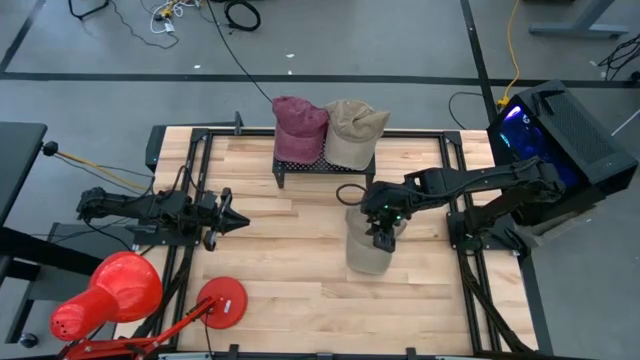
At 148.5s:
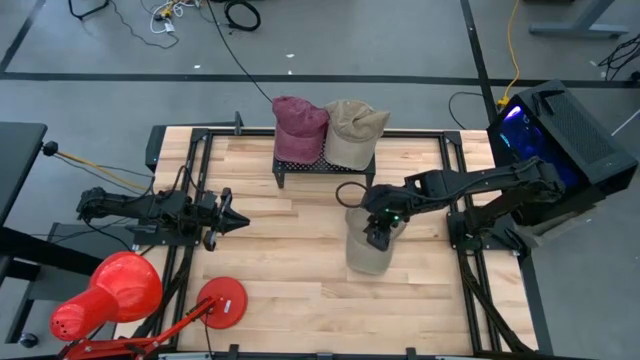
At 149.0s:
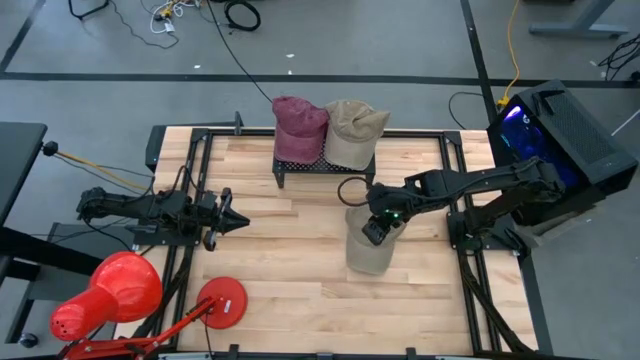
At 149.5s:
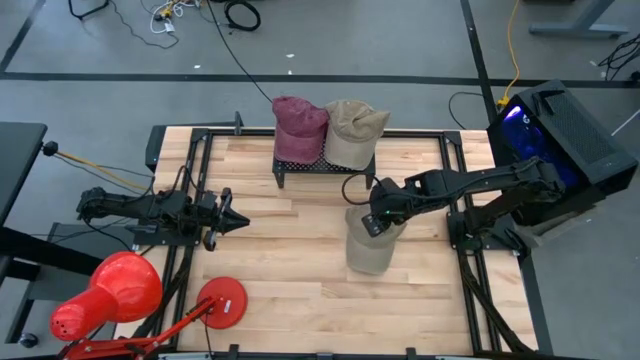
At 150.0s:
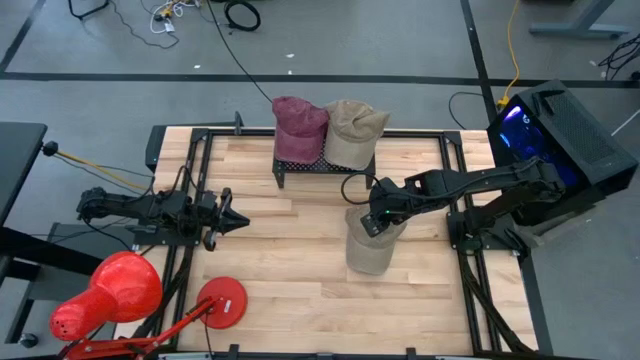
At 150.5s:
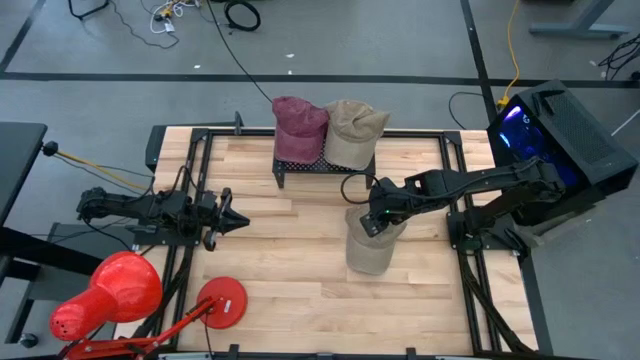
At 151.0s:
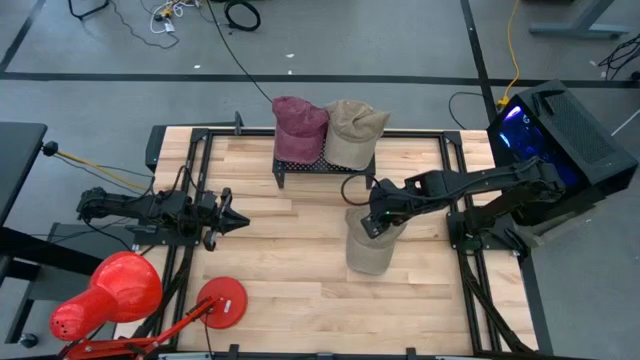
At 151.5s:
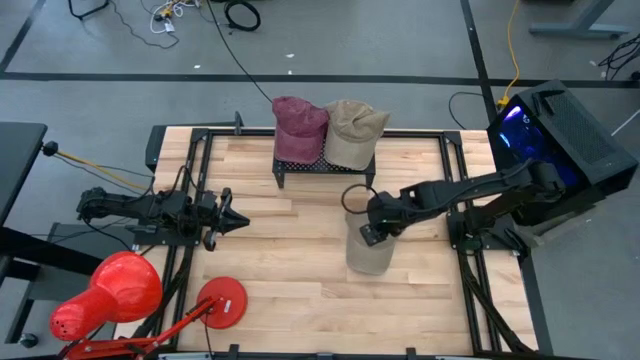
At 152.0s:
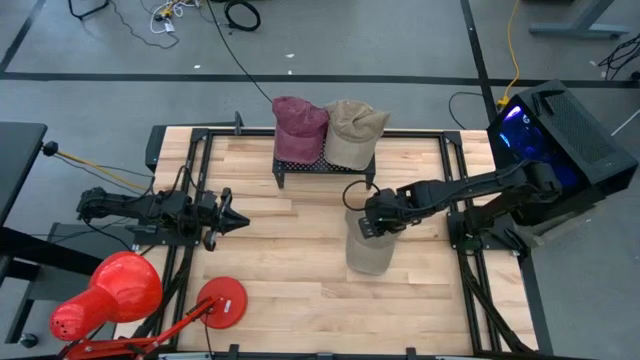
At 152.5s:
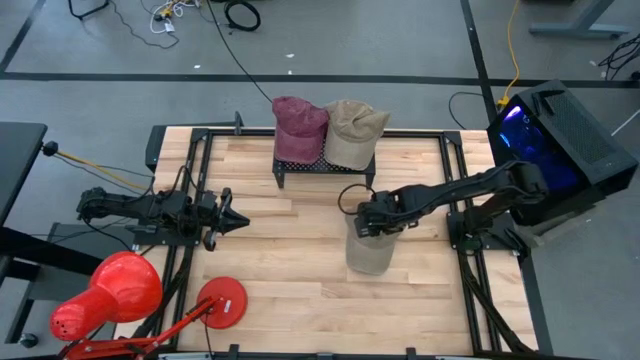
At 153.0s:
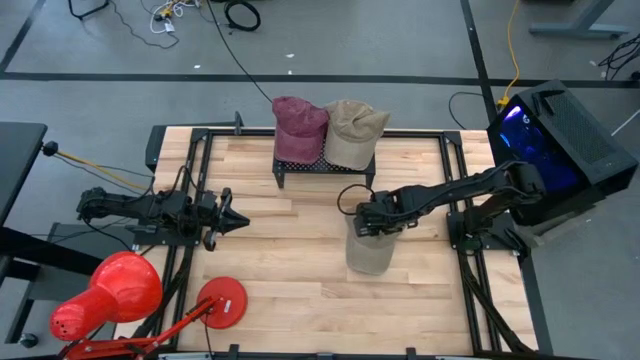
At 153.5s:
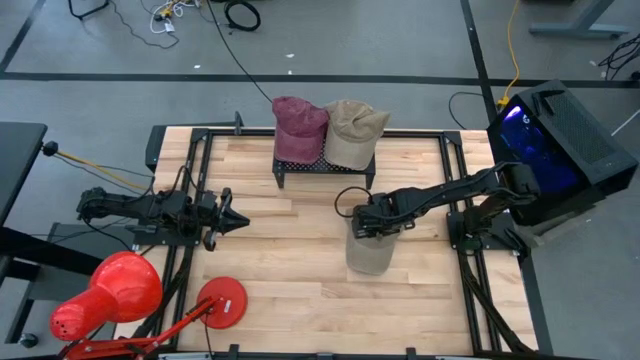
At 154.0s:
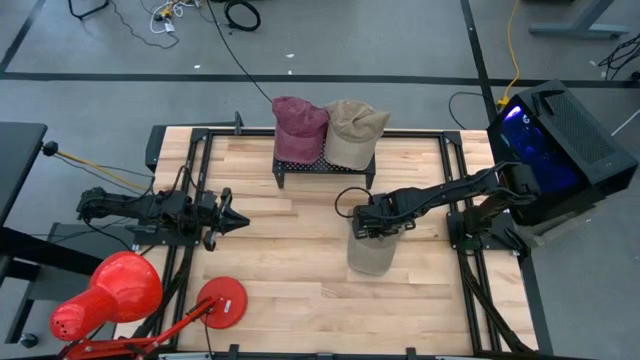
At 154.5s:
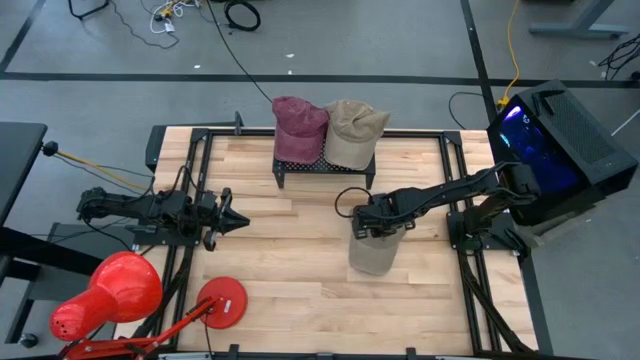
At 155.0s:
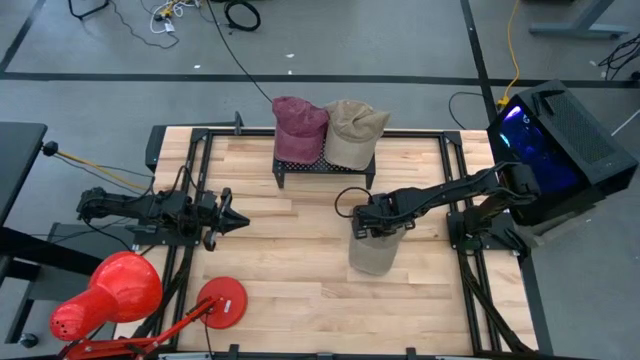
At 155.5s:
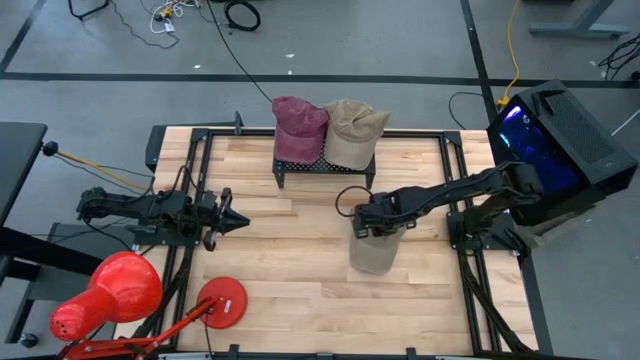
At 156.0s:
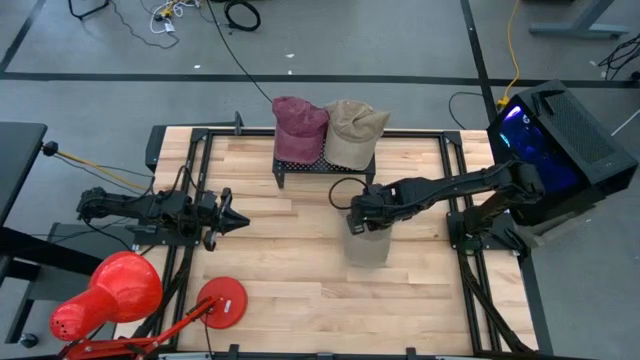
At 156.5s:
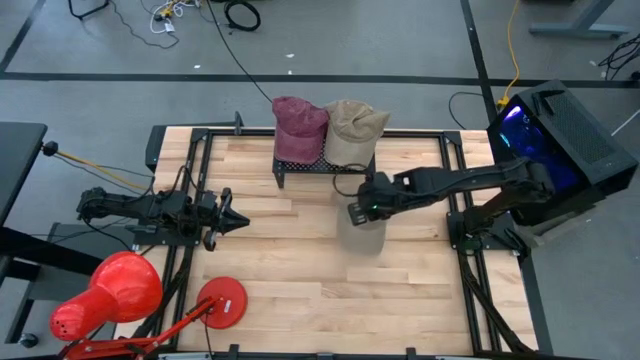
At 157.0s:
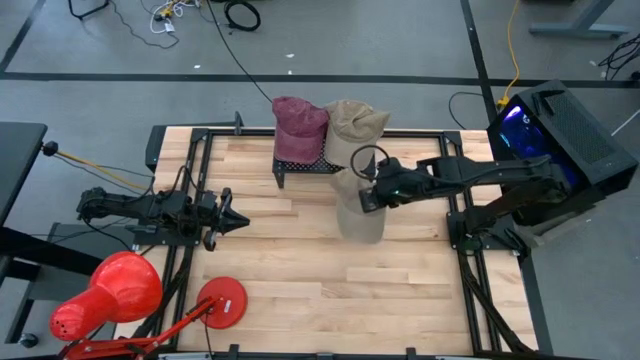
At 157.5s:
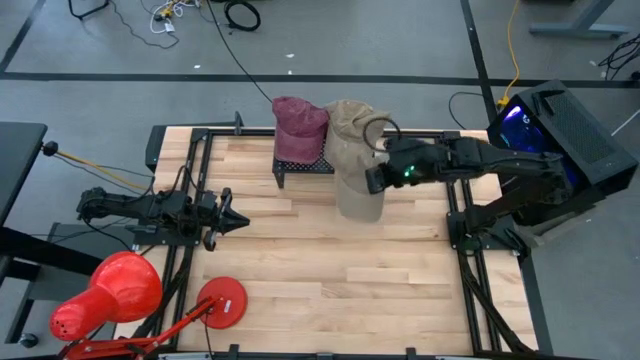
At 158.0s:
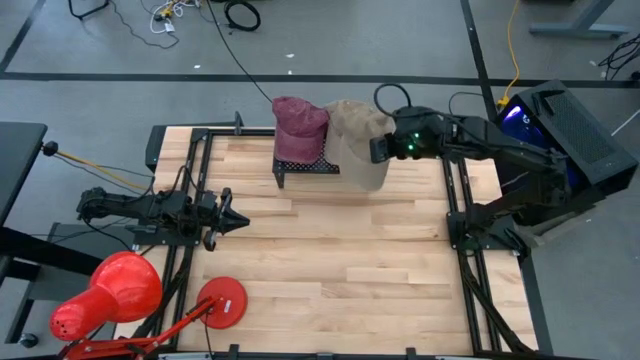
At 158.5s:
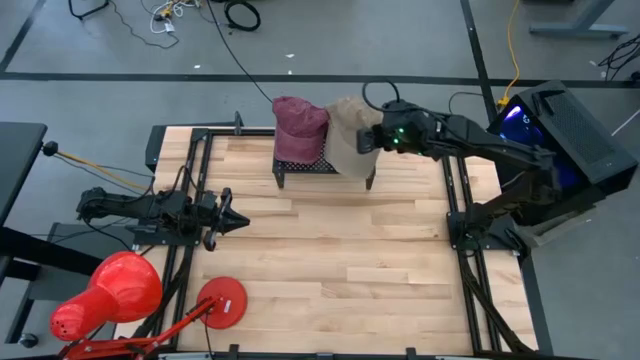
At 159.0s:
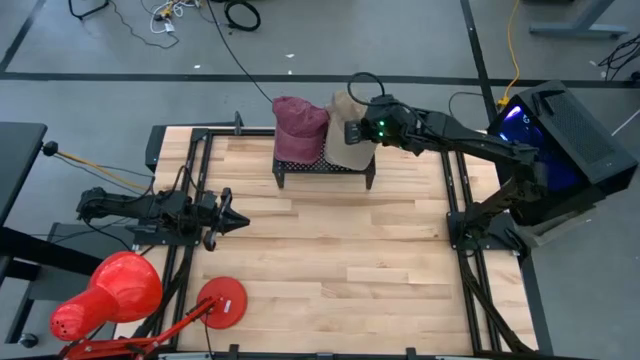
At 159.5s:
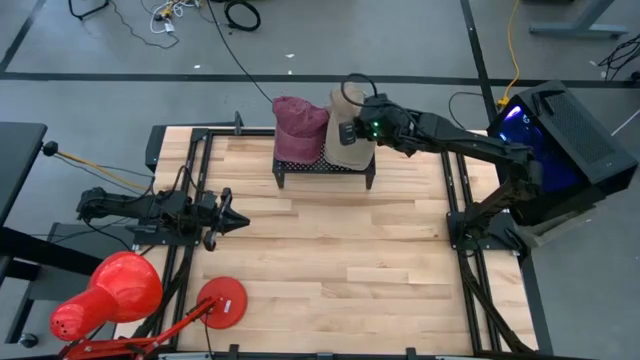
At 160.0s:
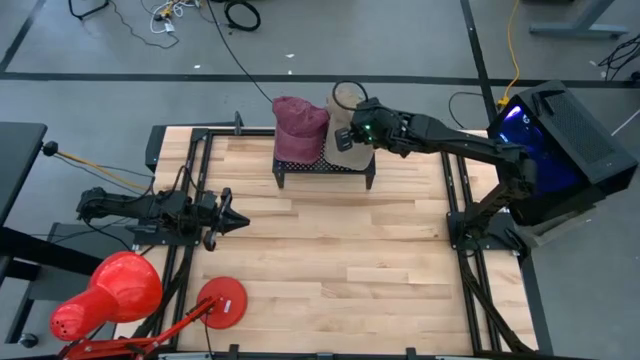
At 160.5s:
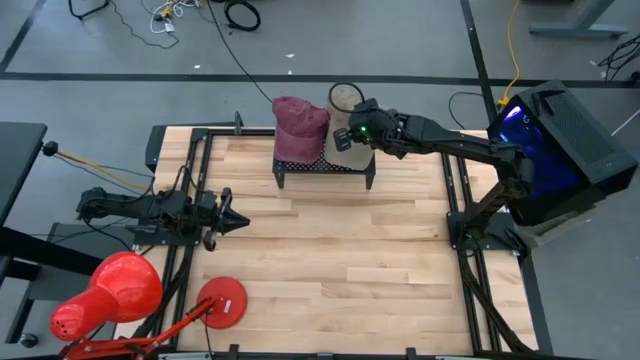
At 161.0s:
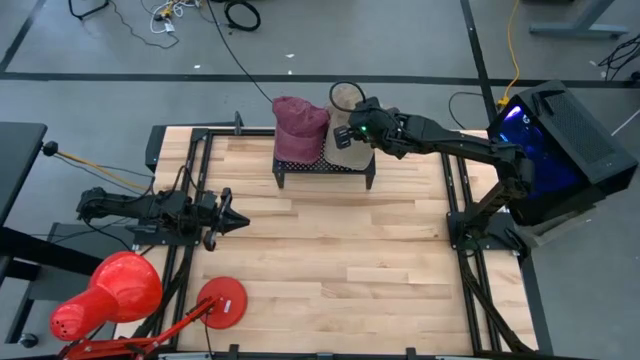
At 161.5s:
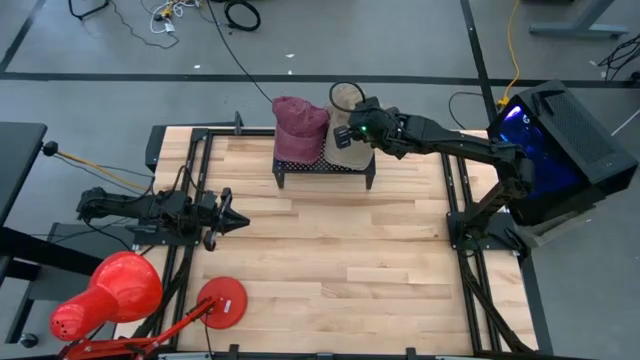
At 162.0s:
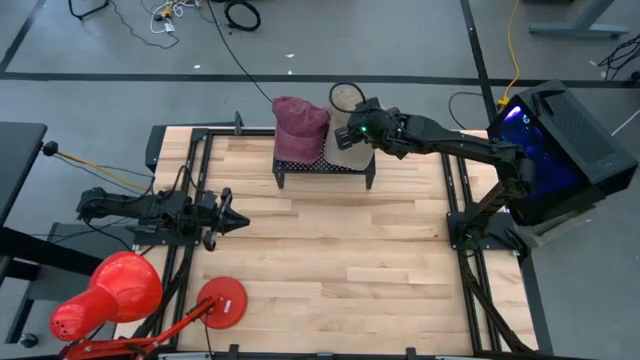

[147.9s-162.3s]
Task: Pick & Place hat
Stack the brown cap on top of the brown cap on the shelf

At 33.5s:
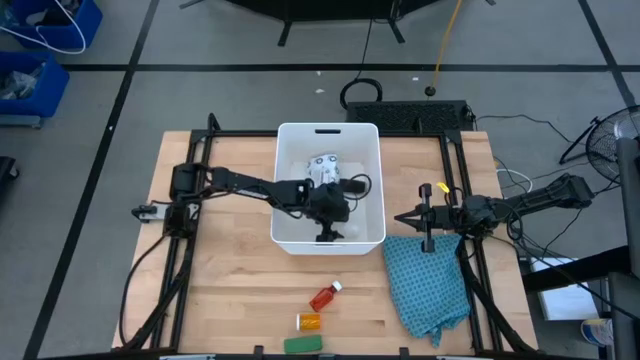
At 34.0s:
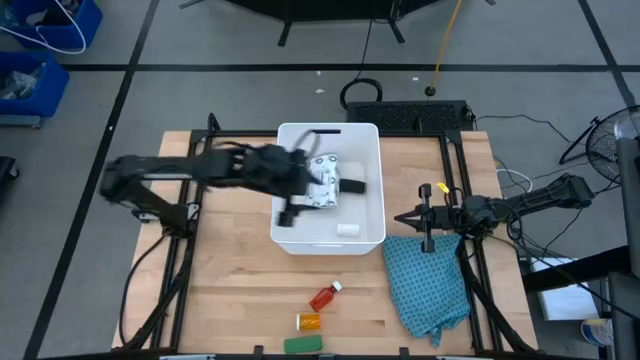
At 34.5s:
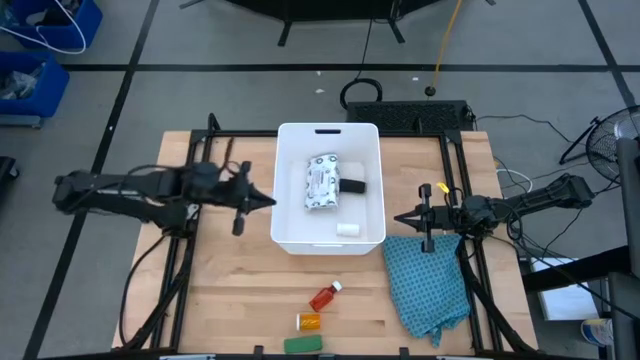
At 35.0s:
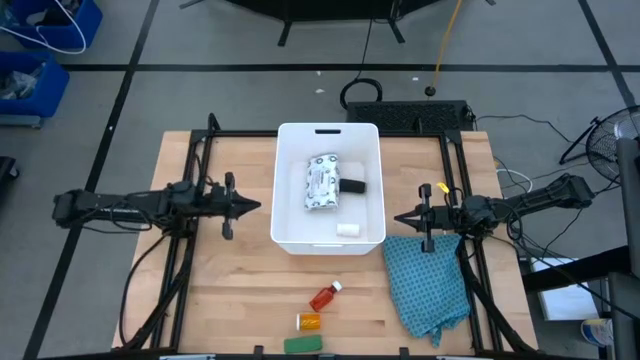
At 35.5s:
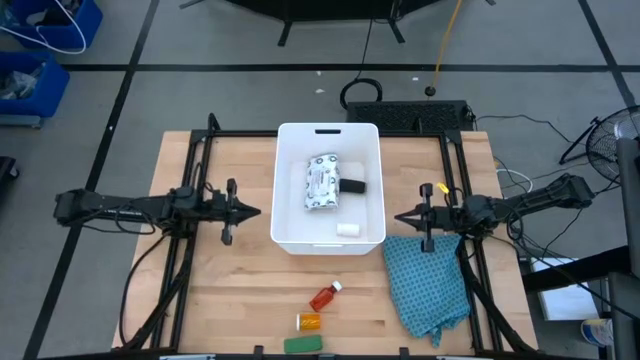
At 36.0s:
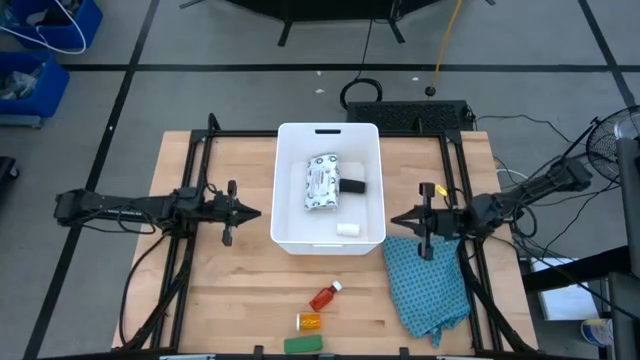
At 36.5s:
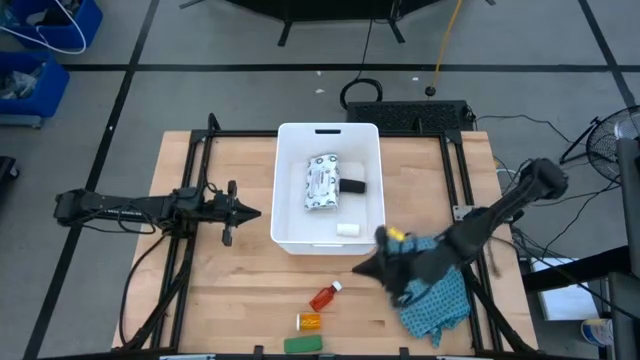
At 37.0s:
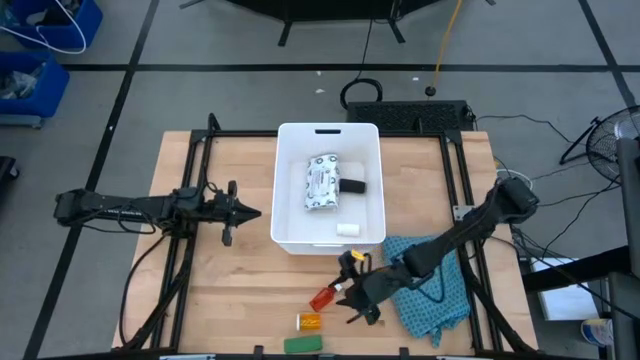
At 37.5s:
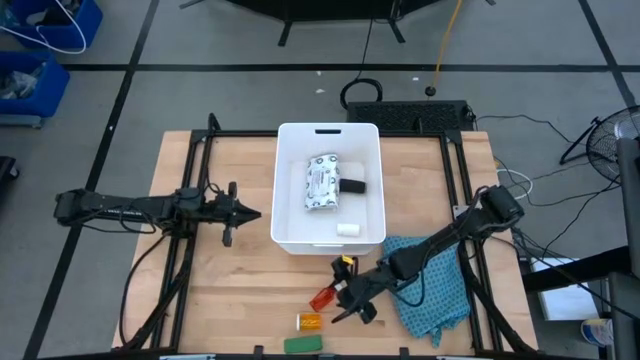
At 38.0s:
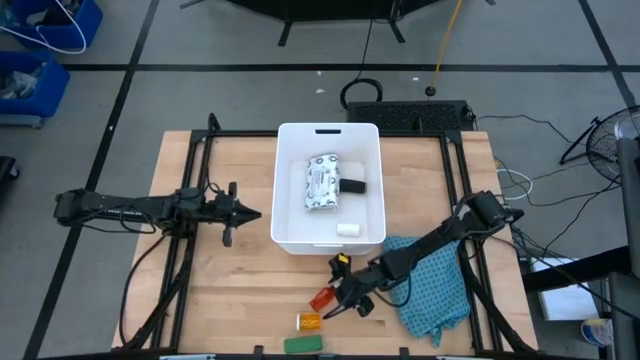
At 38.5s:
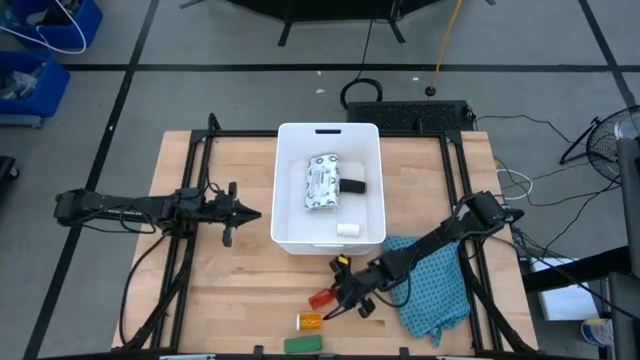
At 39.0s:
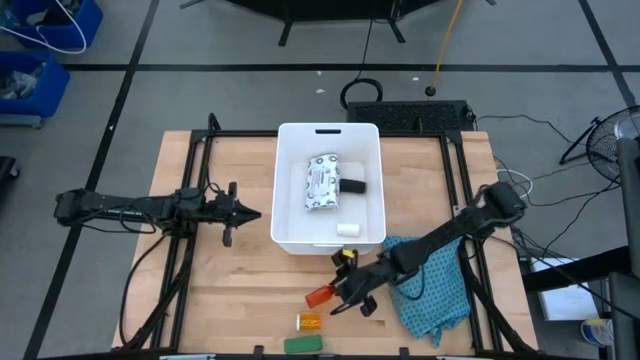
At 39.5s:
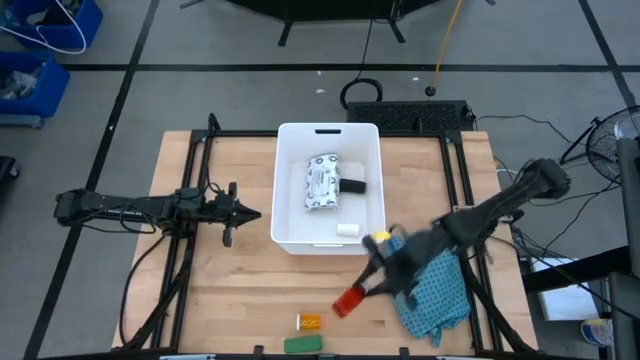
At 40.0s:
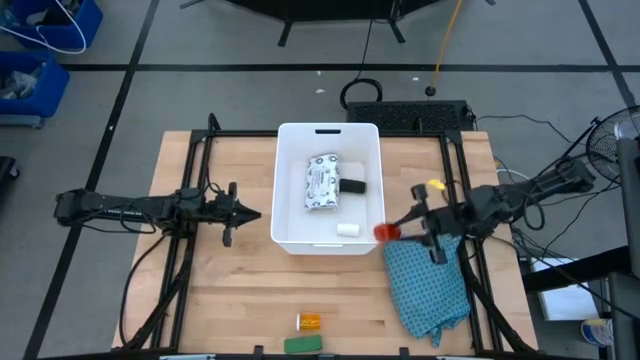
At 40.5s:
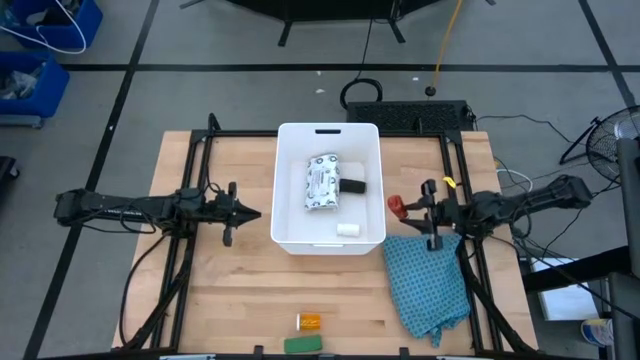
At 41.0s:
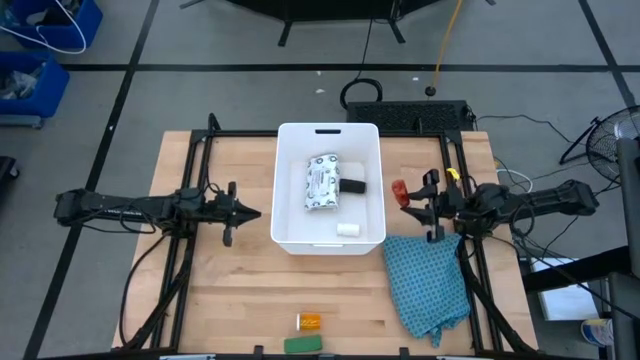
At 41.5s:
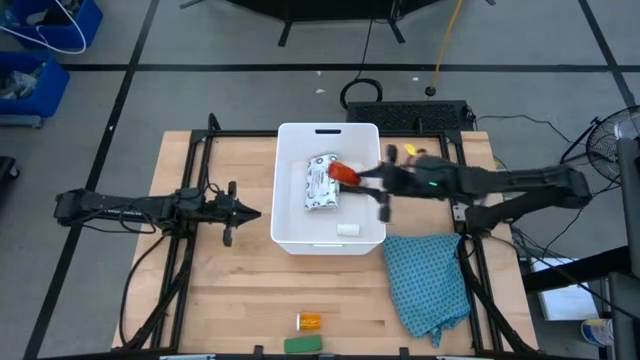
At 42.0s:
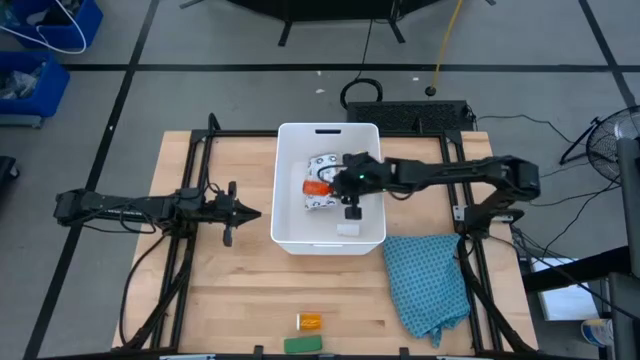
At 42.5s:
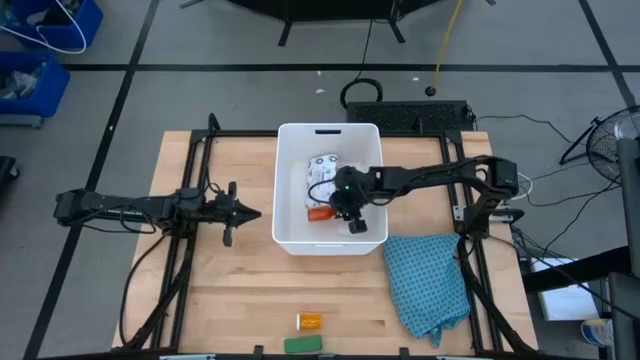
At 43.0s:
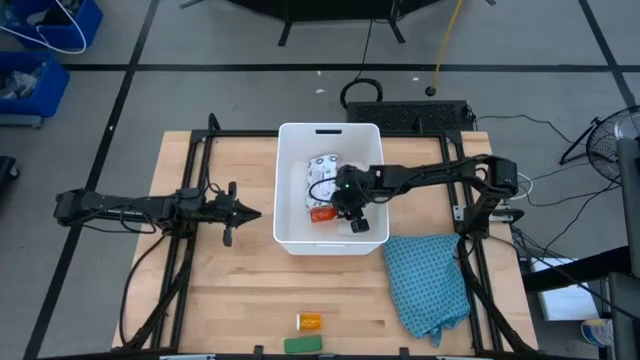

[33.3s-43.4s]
Task: Pick & place medical supplies in basket/bin
Put the red pill bottle into the white bin
